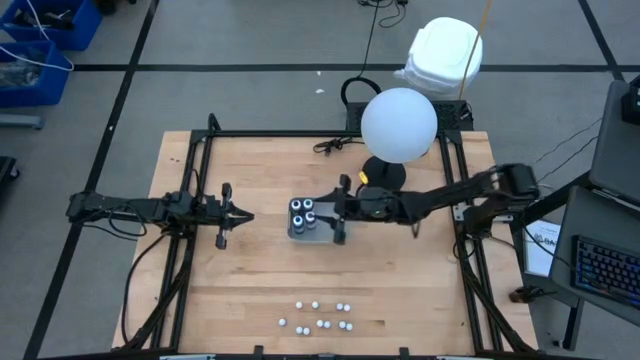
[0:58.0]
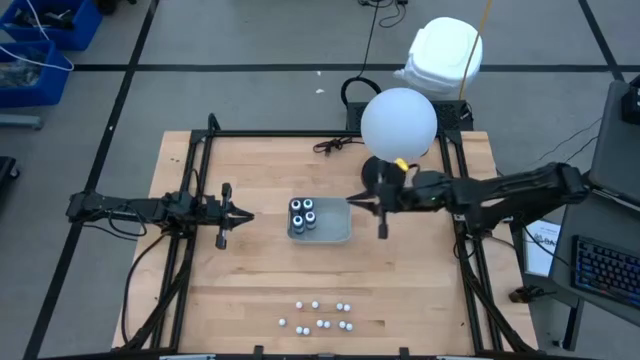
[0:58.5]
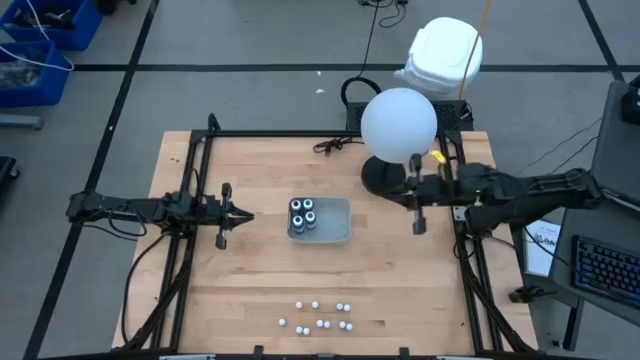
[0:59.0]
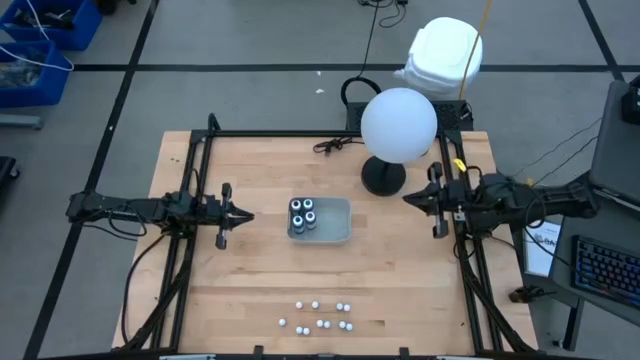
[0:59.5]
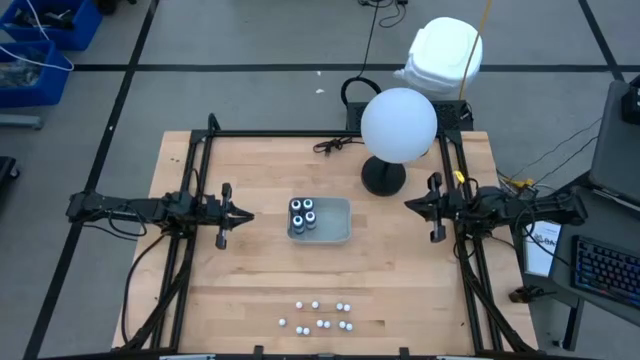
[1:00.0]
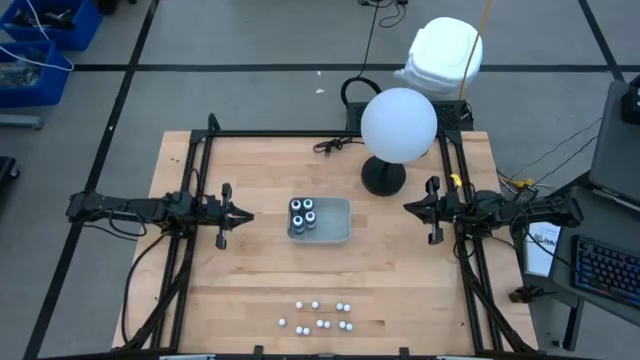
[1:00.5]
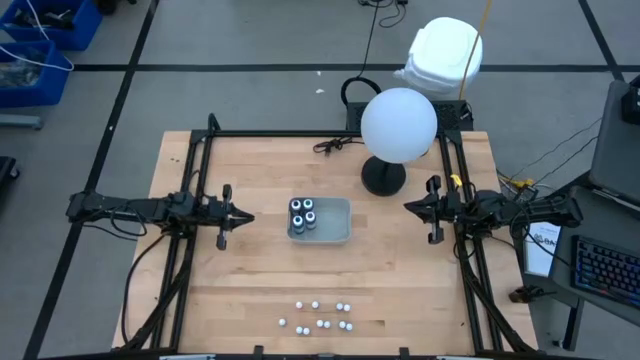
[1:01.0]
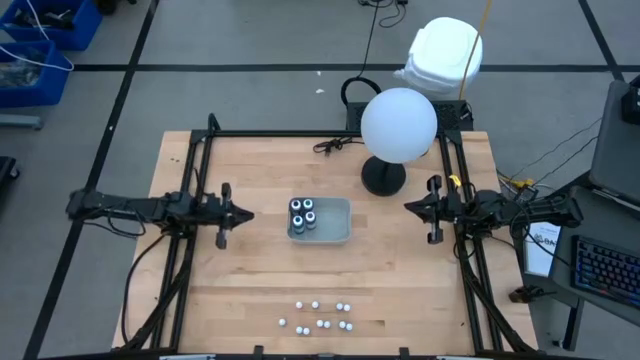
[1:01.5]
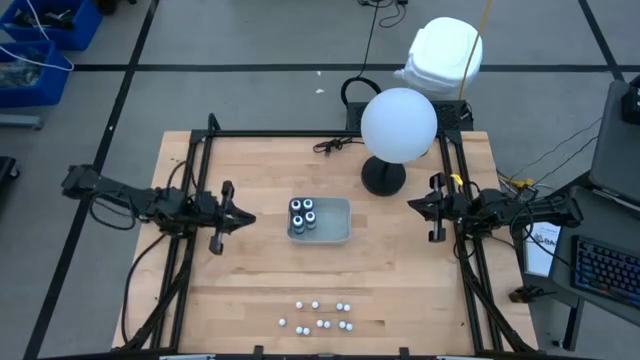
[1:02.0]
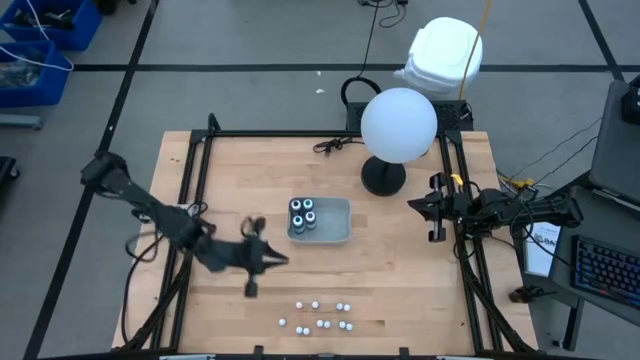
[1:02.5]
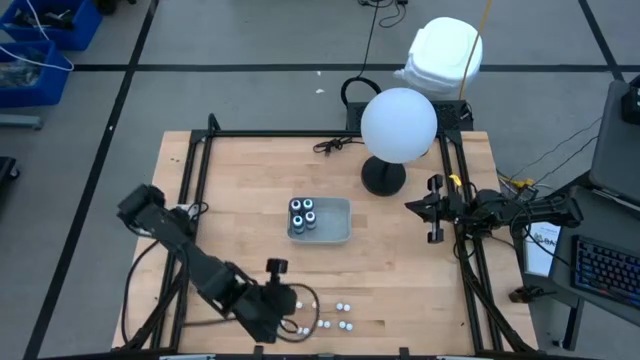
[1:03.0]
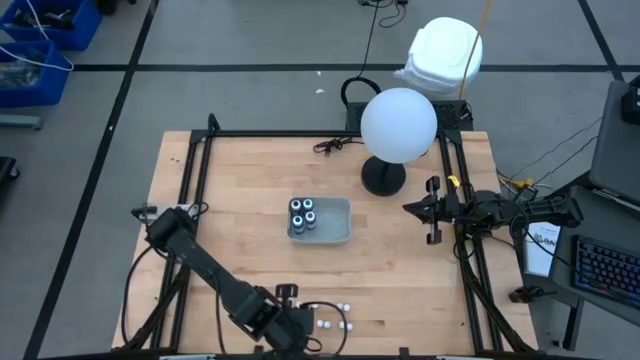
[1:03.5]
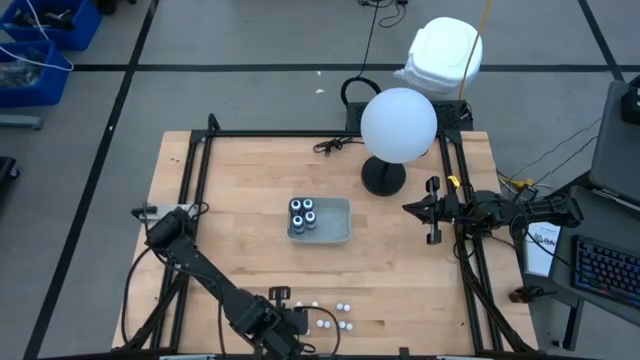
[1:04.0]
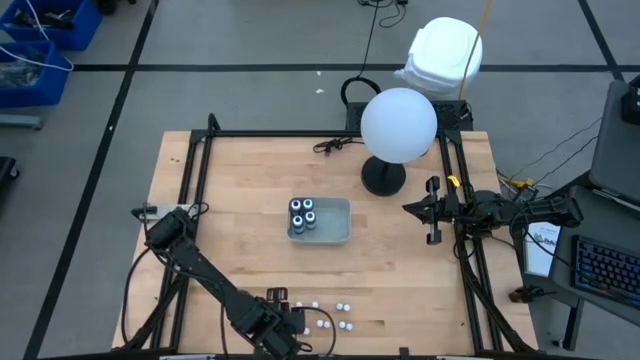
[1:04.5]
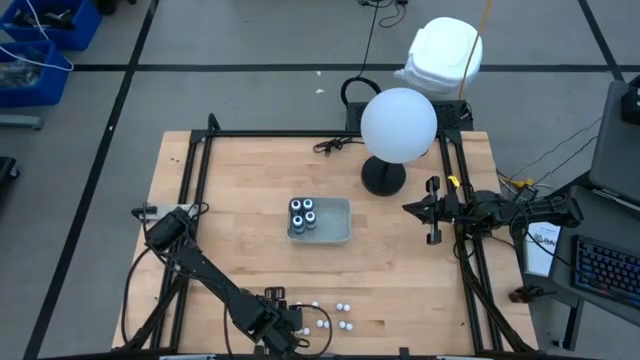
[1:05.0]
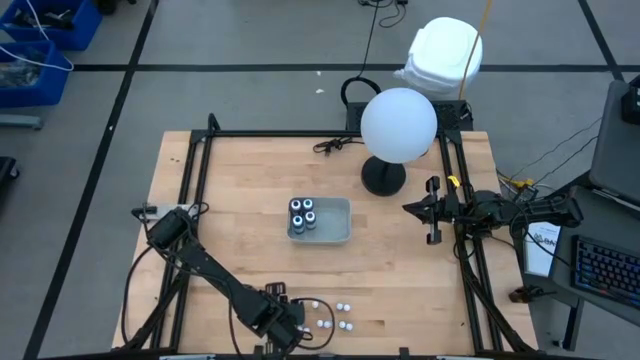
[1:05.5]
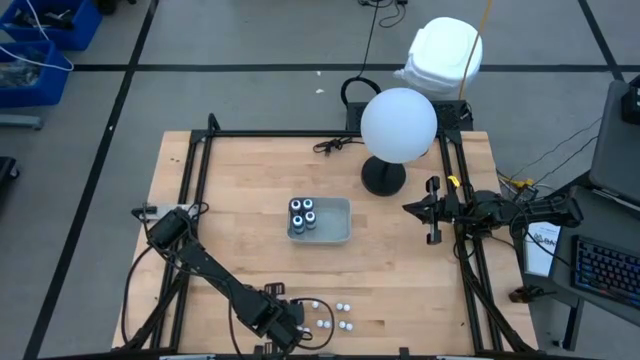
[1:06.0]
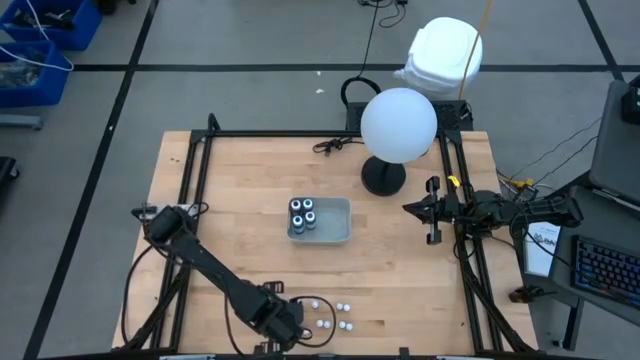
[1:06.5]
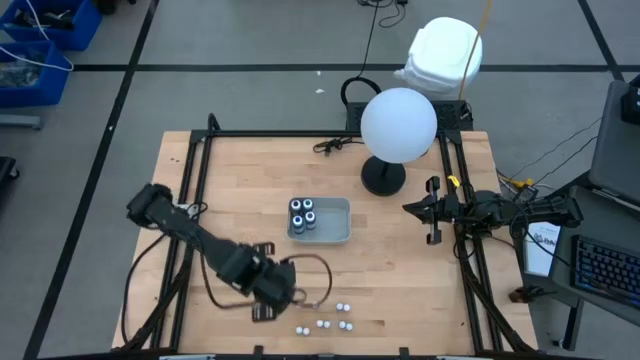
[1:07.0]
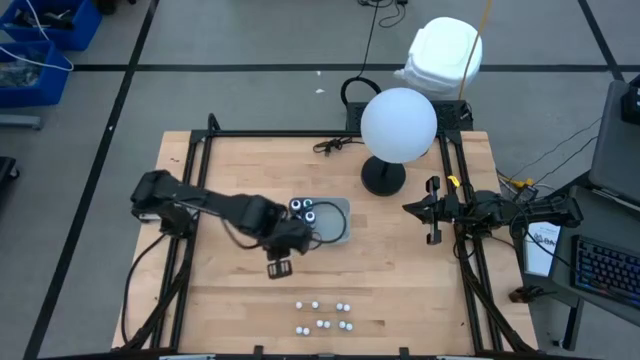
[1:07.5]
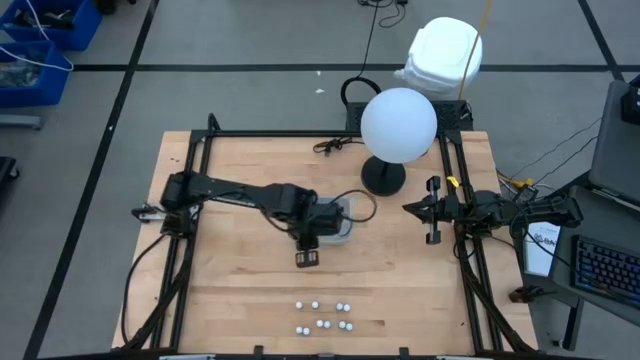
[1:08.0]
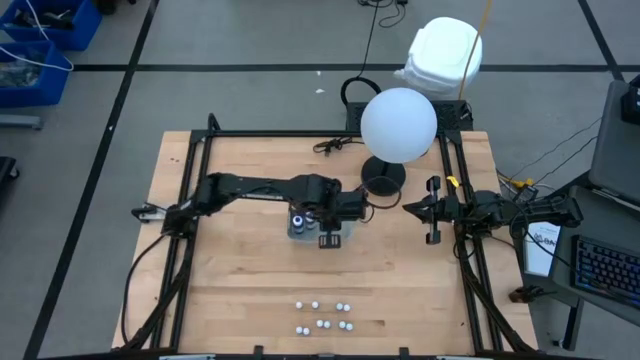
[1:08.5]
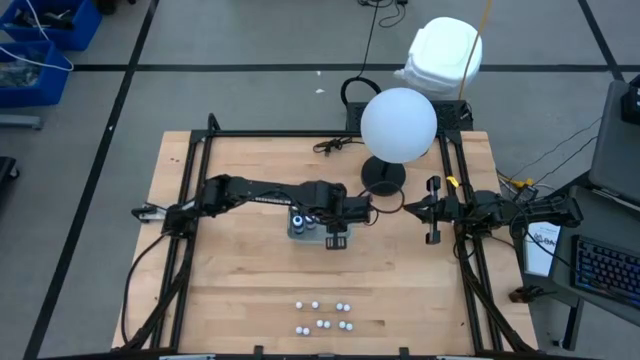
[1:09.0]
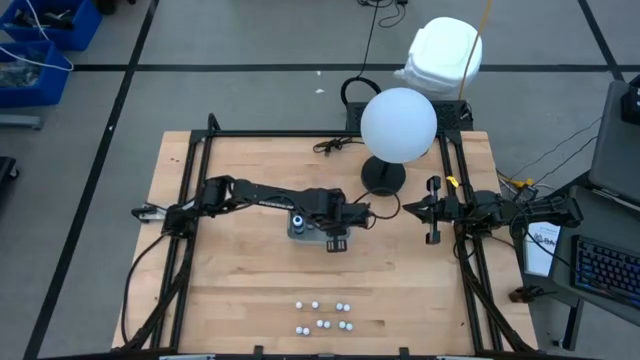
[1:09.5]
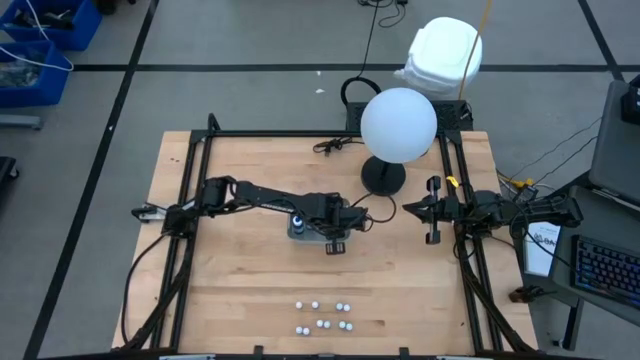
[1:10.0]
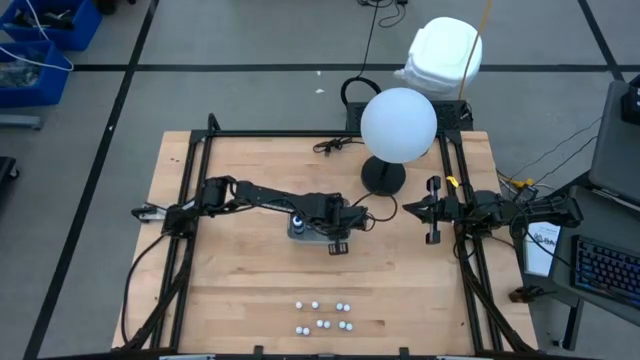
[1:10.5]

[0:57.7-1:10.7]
Task: Pick & Place food coloring
Put the small black food coloring bottle into the gray bin

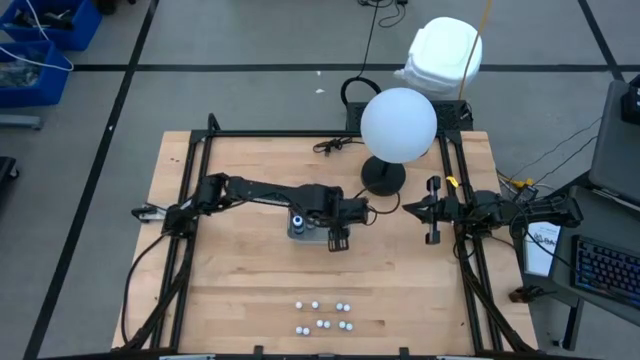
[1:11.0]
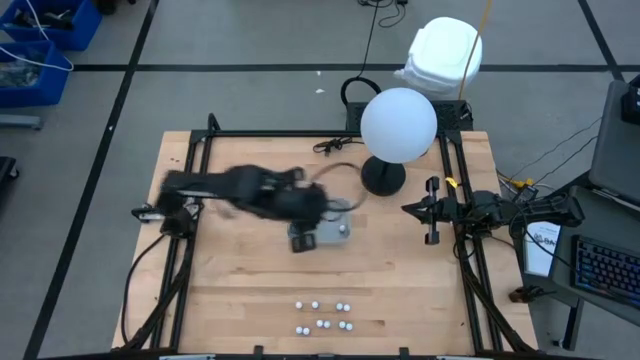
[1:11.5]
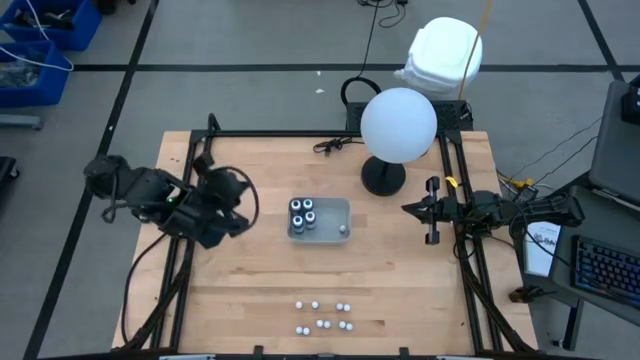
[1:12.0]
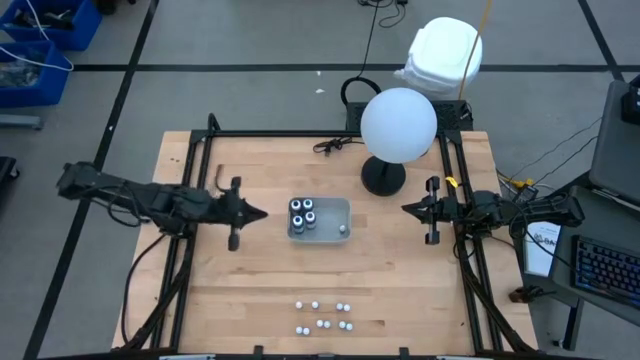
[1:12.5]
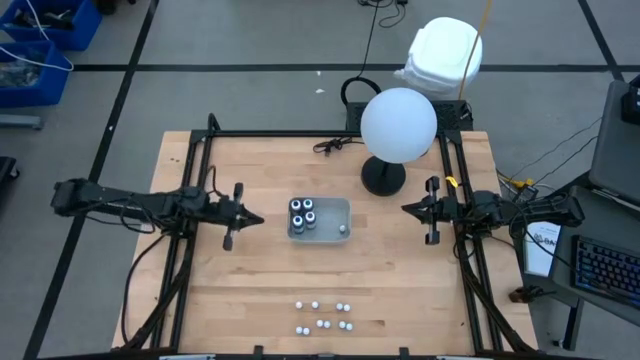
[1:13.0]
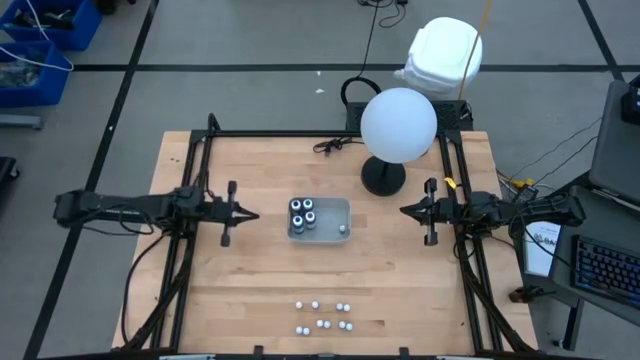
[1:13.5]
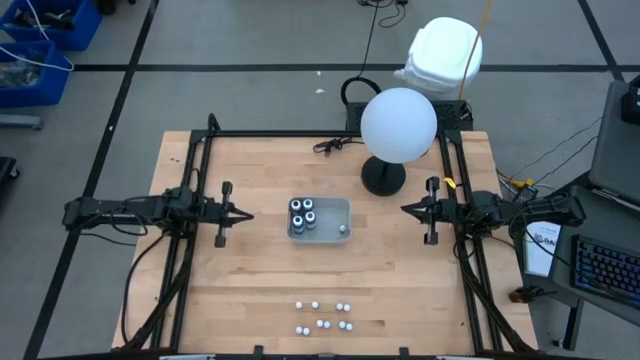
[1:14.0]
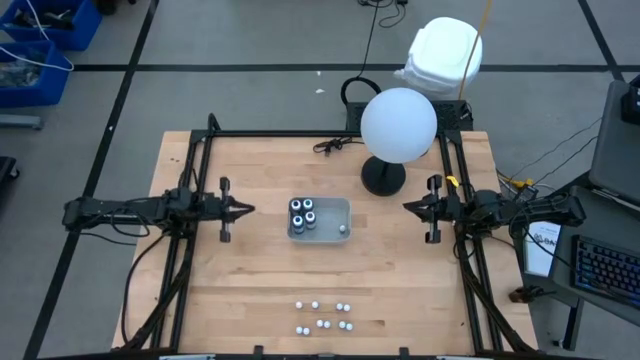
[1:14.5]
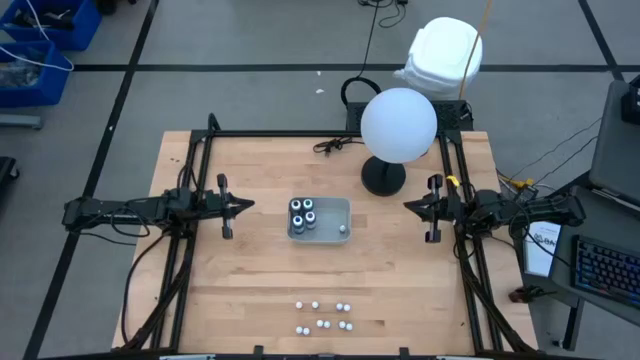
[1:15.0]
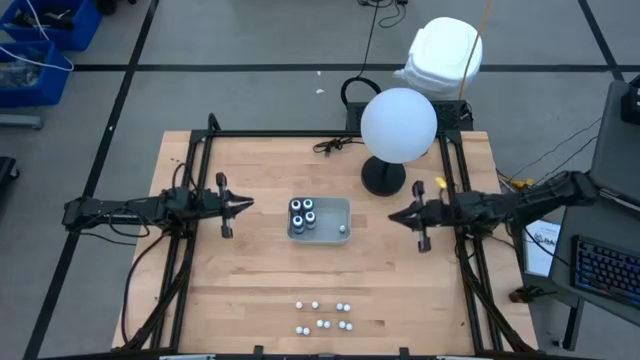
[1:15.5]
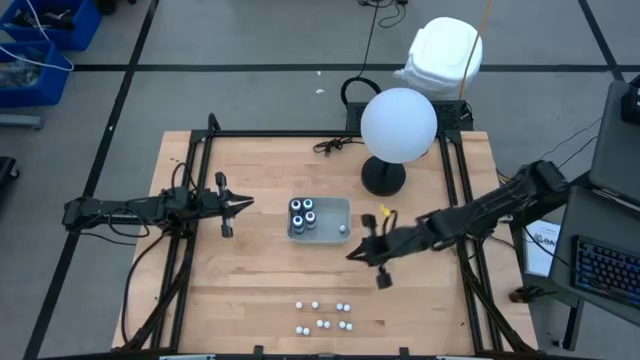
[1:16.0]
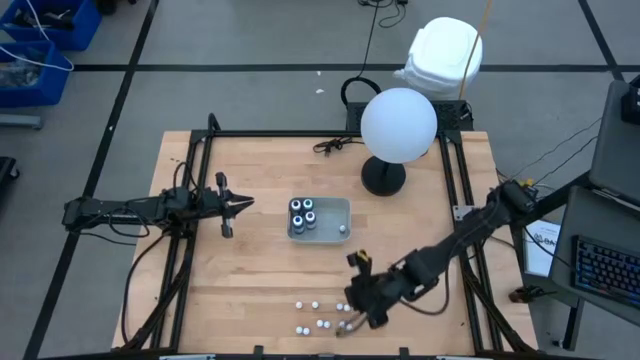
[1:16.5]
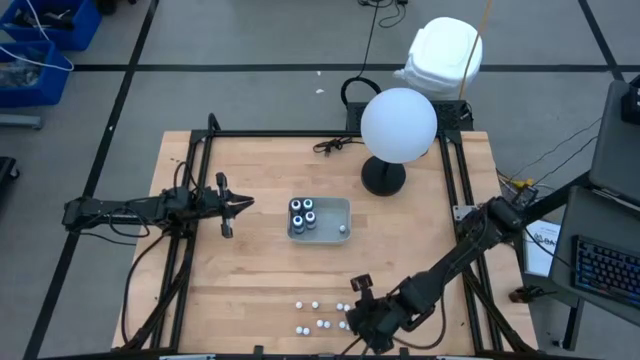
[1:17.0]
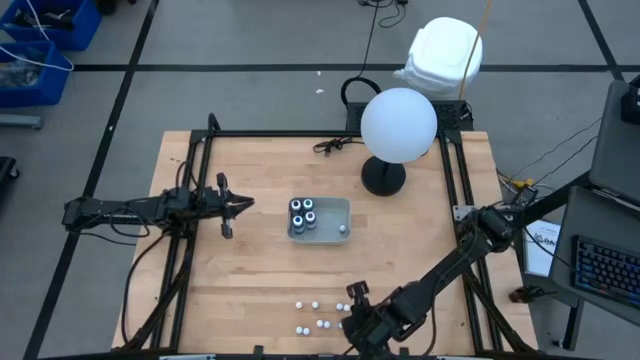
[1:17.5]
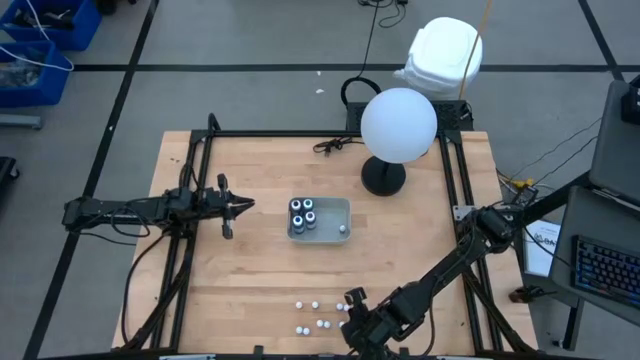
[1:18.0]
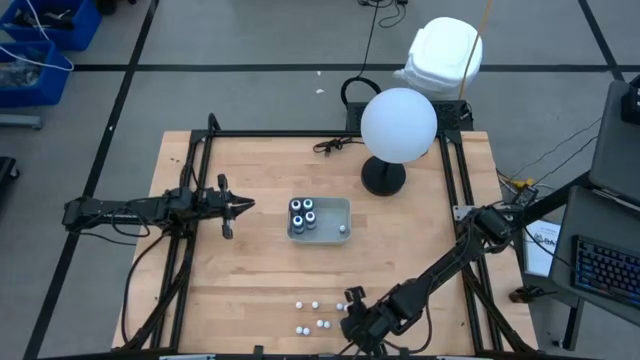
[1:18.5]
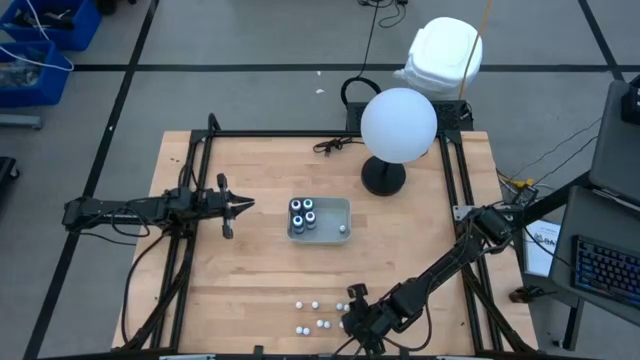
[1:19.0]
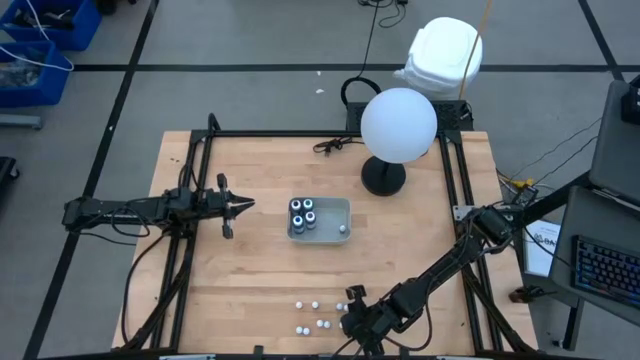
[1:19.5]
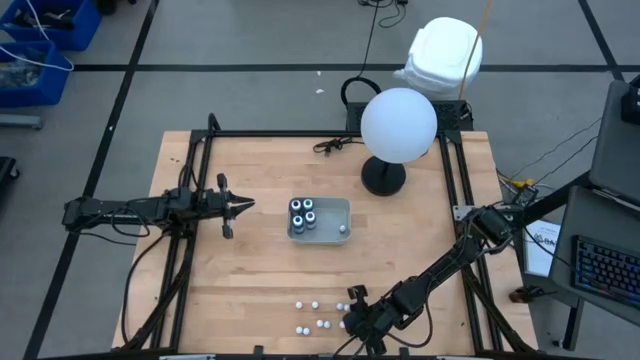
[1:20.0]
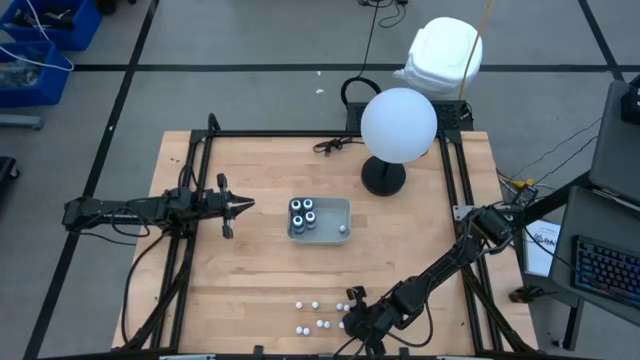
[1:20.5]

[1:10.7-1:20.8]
Put the small dark blue food coloring bottle into the gray bin
